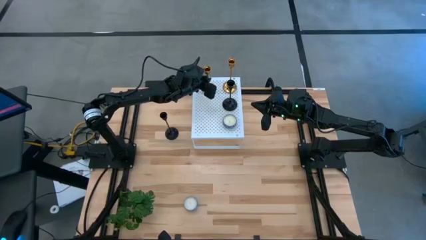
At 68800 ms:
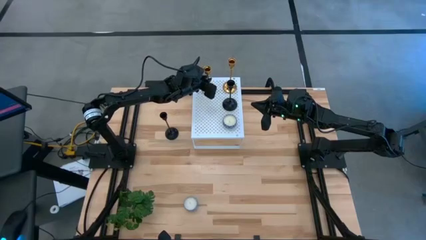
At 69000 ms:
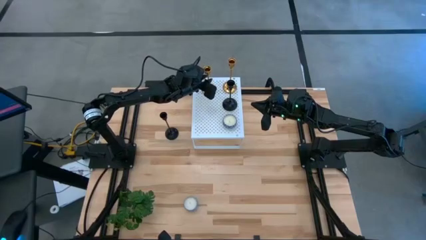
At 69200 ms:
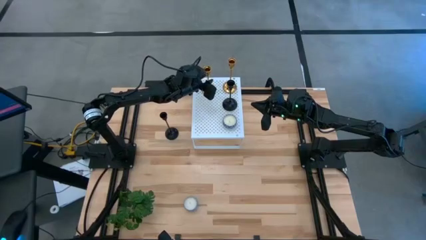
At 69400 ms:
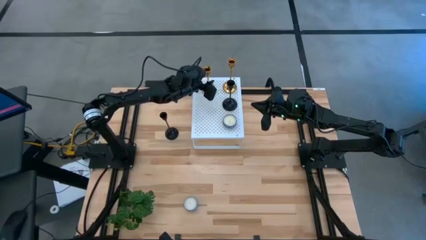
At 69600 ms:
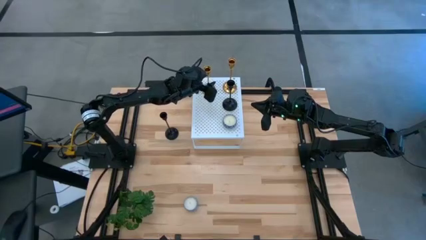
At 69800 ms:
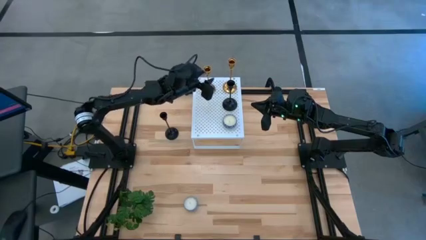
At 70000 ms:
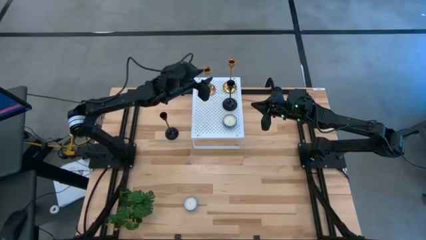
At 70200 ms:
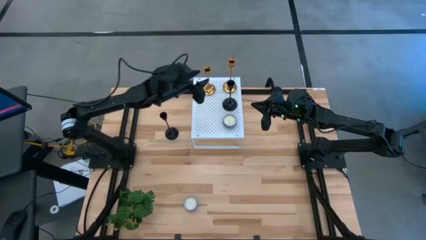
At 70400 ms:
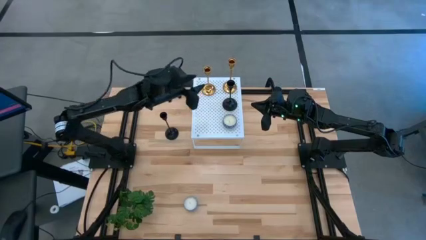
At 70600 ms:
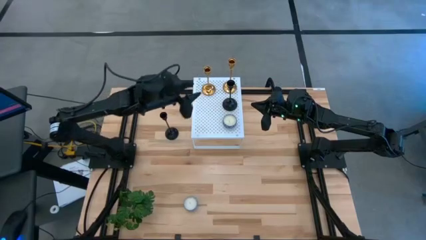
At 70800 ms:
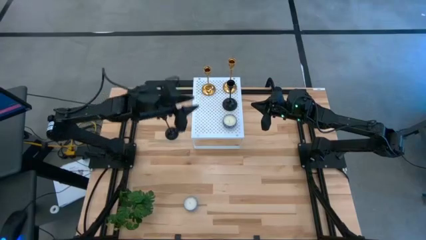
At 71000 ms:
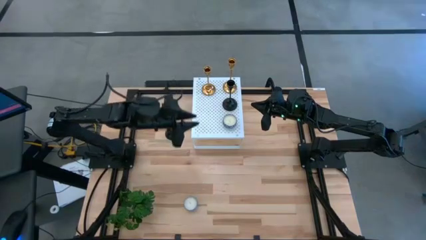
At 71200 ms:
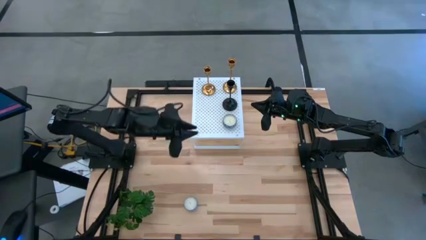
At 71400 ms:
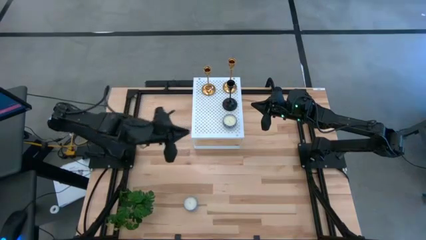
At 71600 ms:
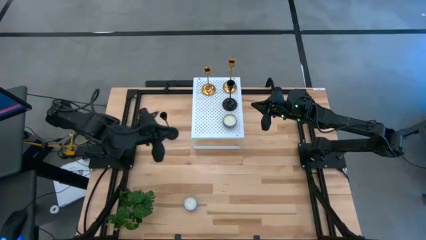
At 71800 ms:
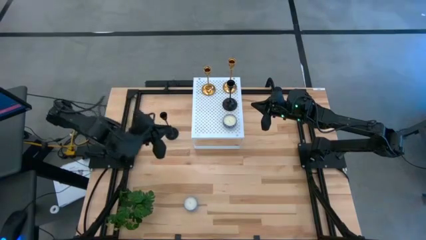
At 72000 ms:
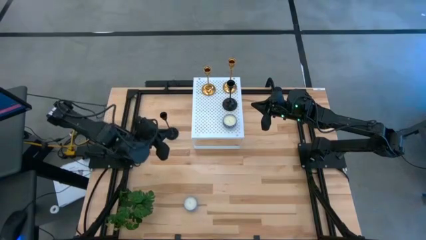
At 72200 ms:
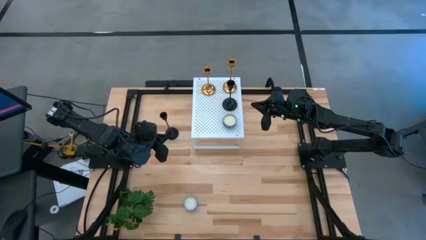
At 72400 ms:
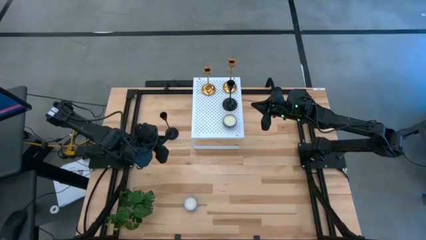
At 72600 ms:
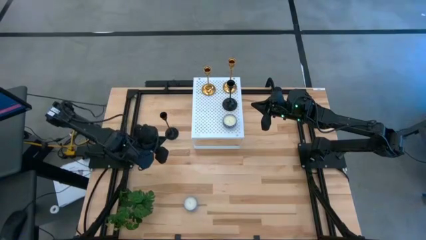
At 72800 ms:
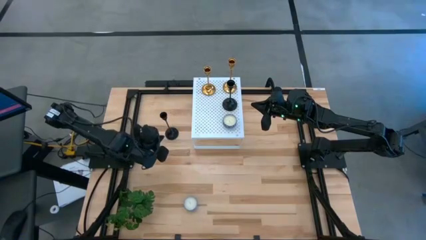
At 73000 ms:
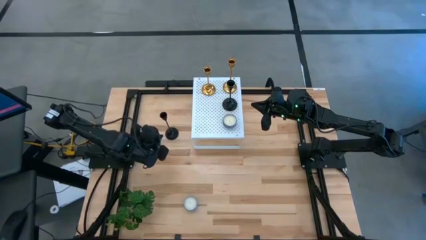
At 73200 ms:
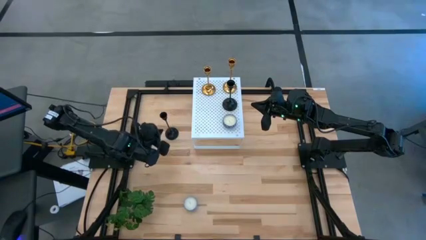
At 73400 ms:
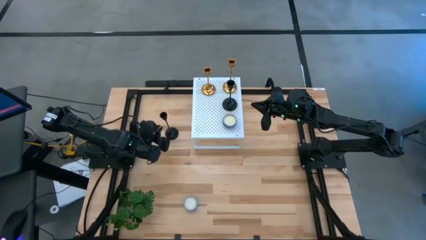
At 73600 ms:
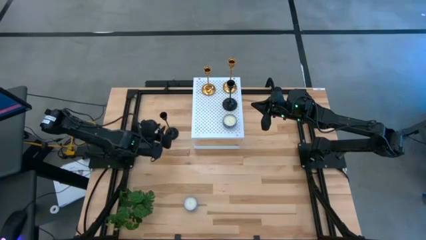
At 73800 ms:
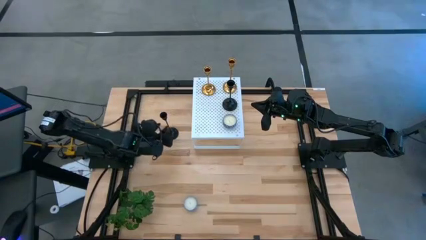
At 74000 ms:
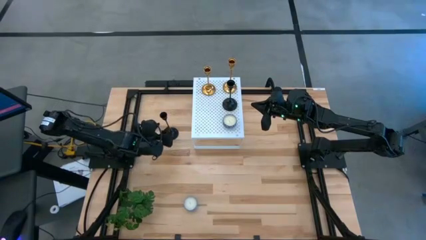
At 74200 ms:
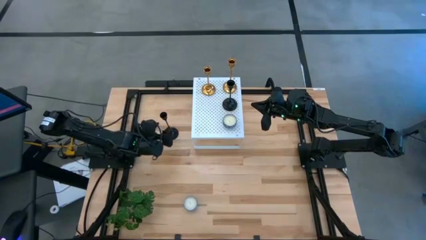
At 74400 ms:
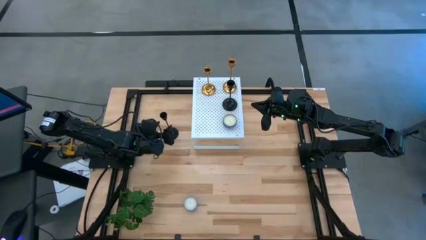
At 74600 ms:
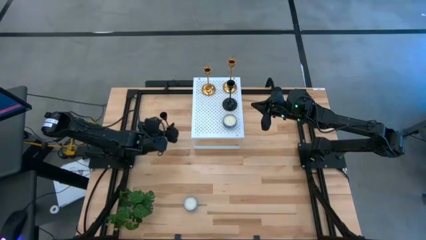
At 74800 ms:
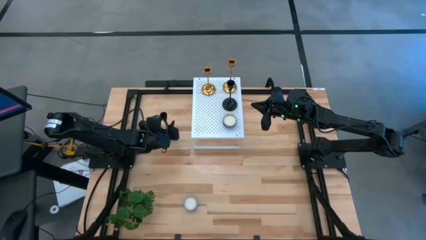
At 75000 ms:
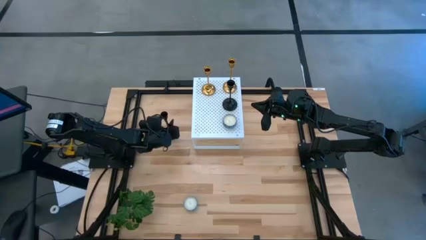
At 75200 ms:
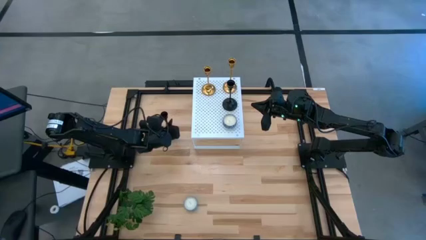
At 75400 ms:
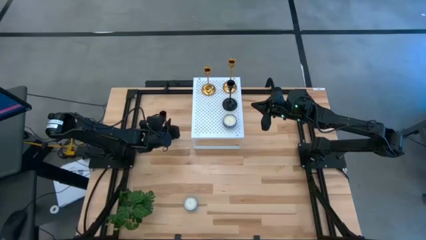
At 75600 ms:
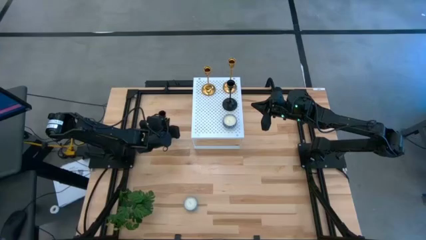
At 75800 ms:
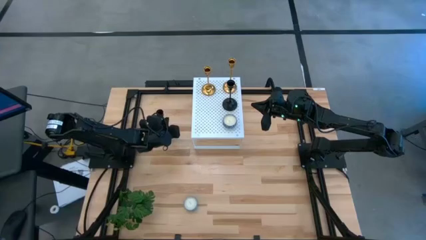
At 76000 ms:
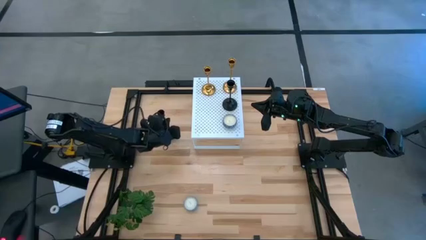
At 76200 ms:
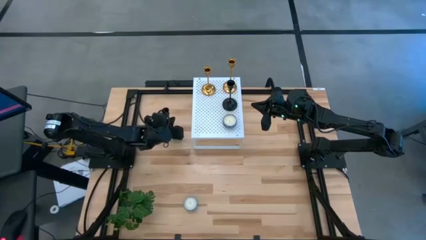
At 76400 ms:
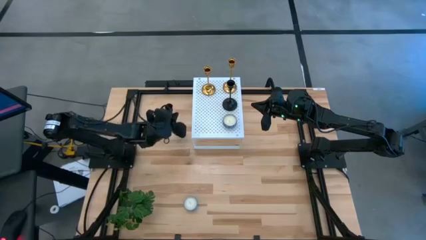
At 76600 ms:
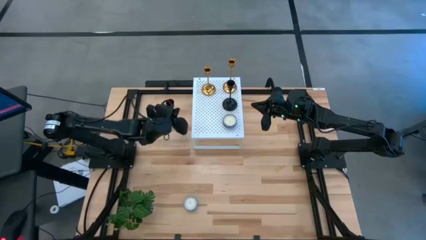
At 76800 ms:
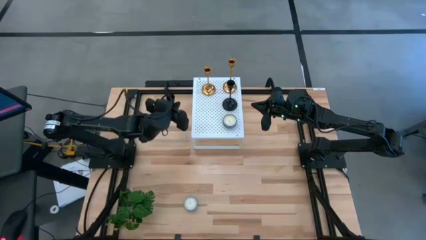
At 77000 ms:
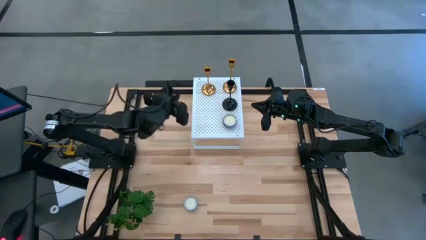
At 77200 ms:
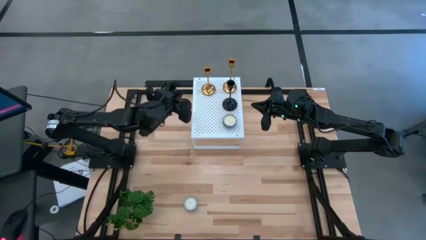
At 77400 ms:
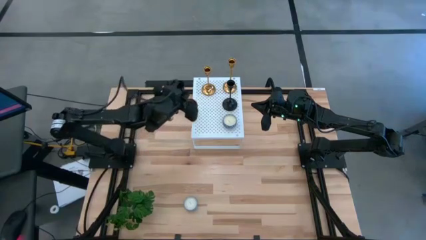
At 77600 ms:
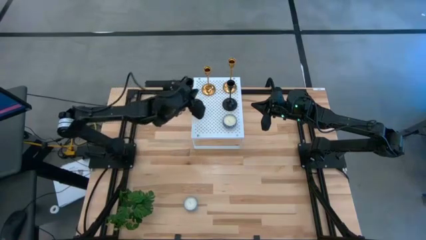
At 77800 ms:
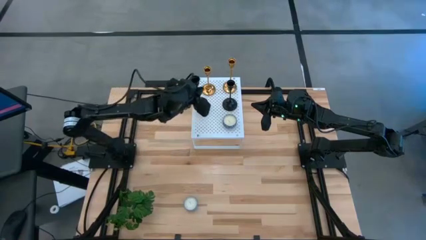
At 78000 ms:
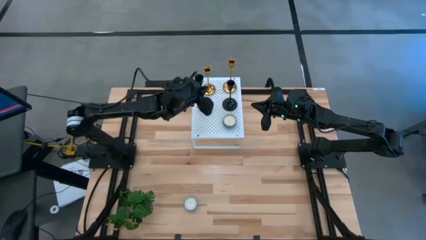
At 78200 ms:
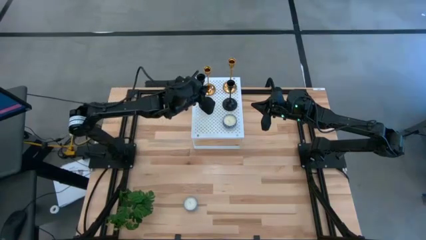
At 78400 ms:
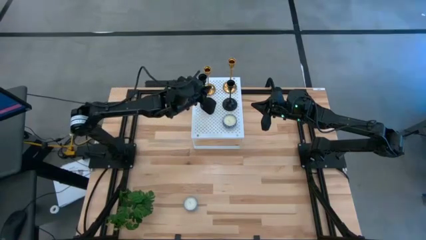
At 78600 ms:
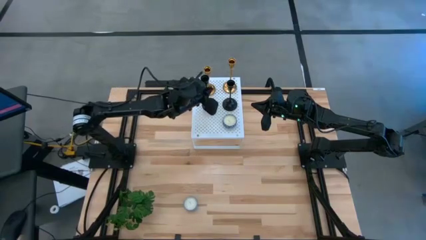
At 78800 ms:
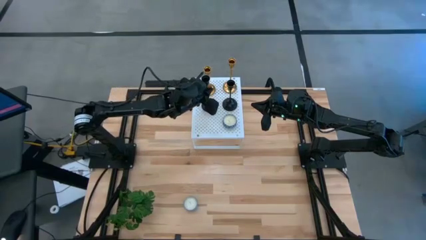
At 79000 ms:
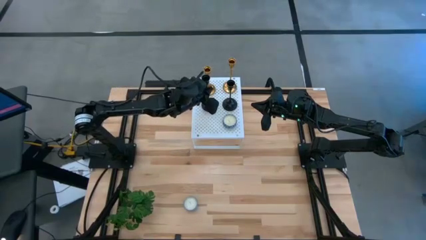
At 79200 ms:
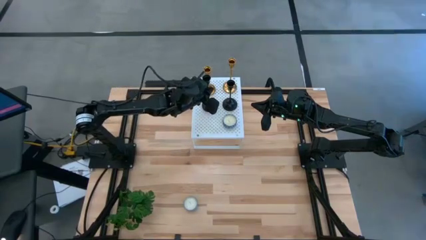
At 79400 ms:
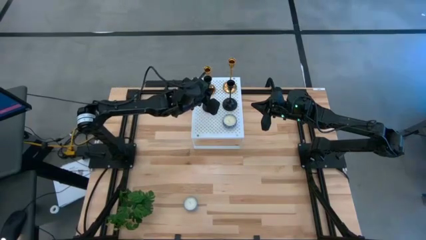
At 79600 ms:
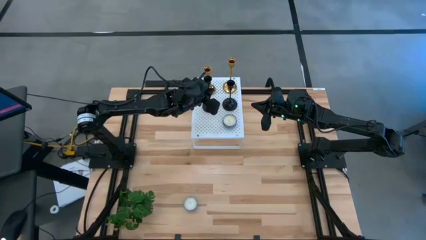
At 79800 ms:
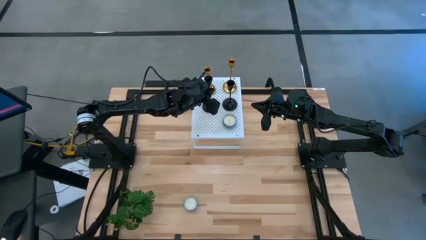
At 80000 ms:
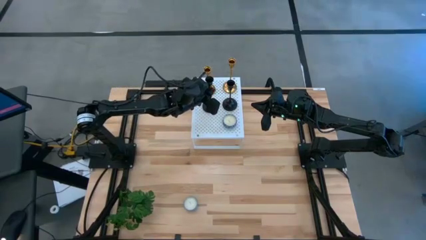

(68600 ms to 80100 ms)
Task: Pick & Place candle stick holders
Put the large black candle holder on the shelf aligned with the small black candle holder

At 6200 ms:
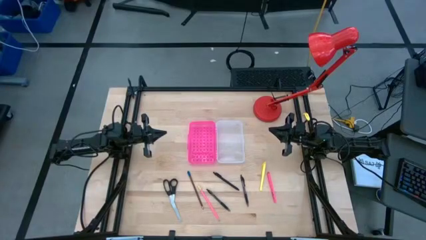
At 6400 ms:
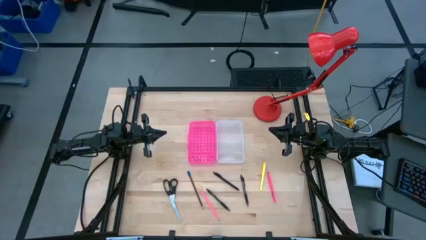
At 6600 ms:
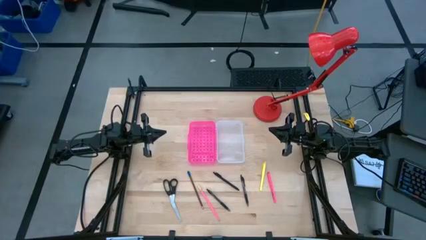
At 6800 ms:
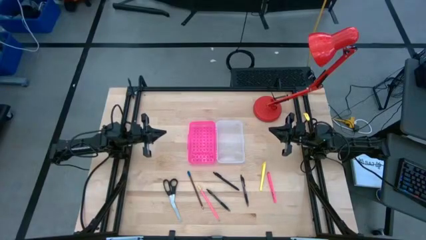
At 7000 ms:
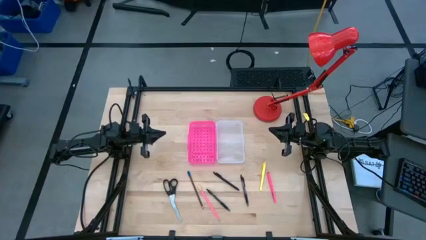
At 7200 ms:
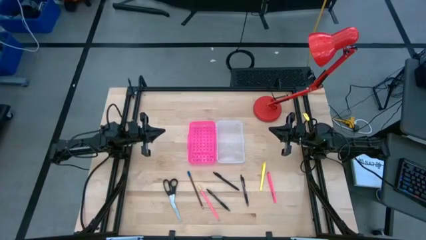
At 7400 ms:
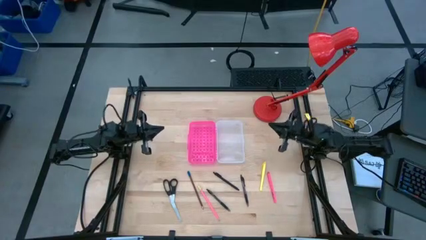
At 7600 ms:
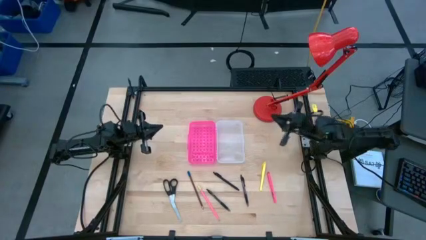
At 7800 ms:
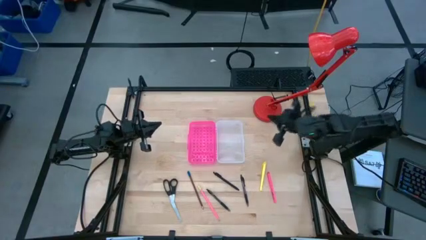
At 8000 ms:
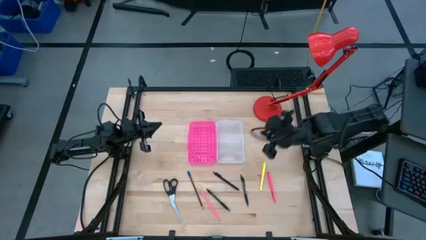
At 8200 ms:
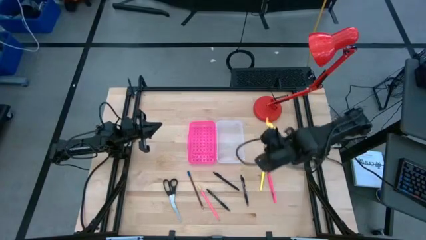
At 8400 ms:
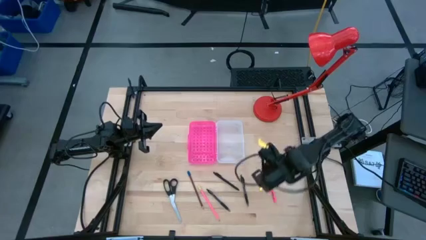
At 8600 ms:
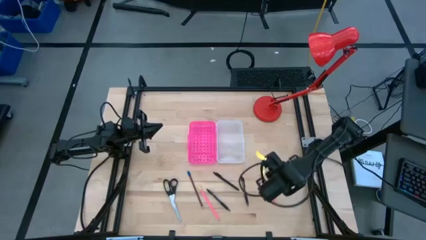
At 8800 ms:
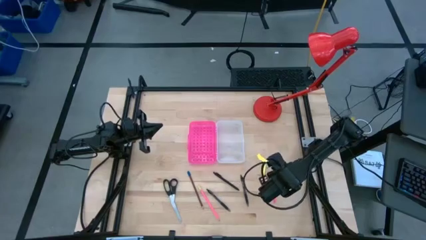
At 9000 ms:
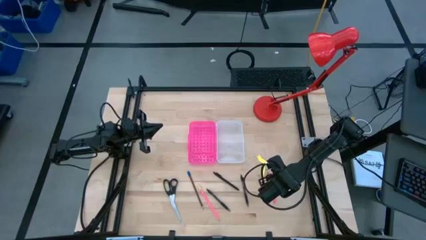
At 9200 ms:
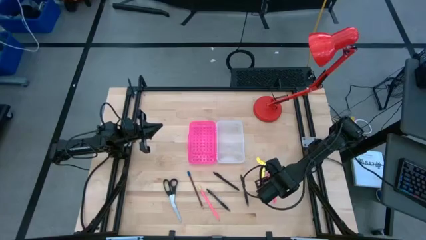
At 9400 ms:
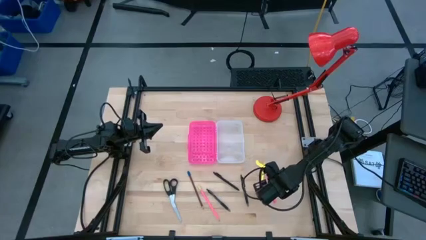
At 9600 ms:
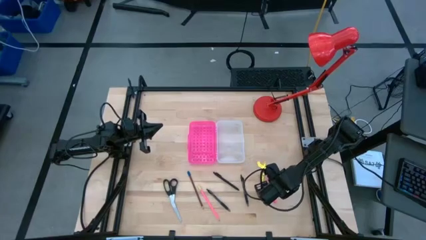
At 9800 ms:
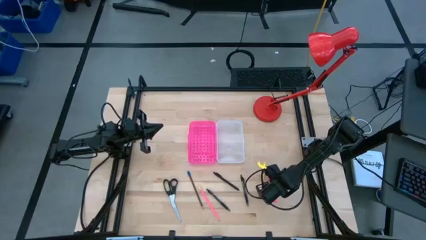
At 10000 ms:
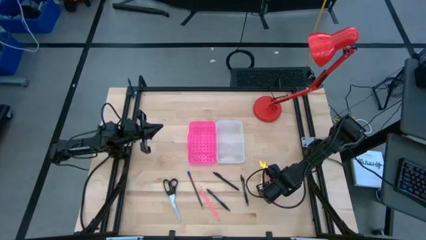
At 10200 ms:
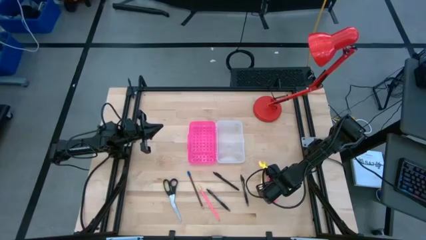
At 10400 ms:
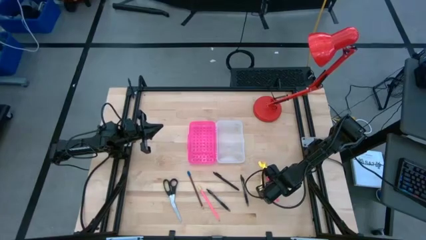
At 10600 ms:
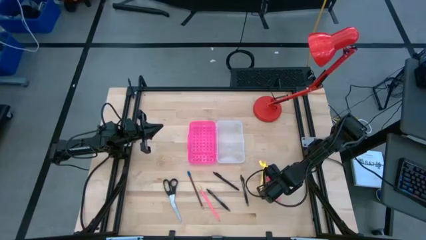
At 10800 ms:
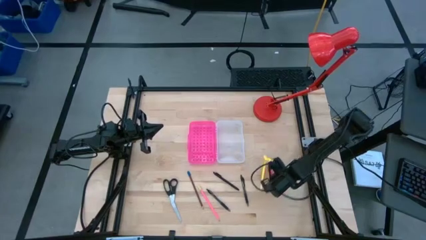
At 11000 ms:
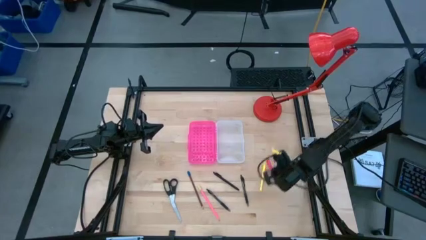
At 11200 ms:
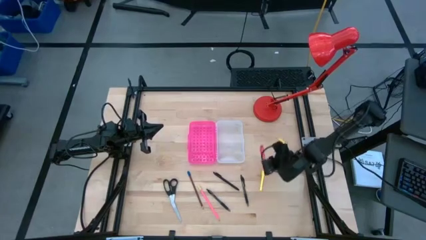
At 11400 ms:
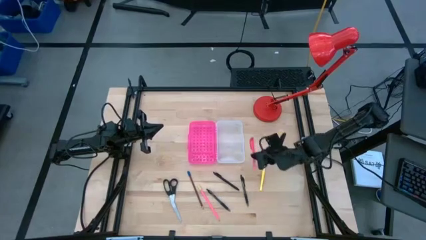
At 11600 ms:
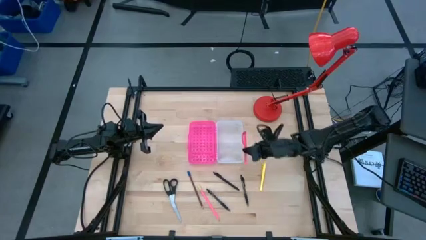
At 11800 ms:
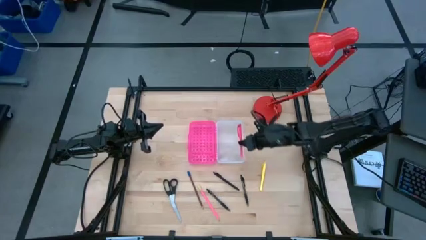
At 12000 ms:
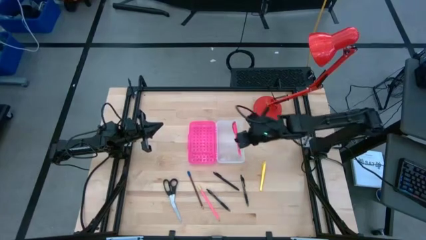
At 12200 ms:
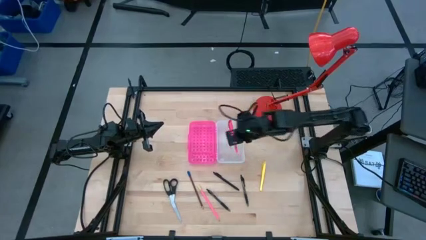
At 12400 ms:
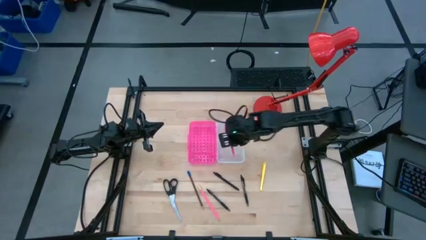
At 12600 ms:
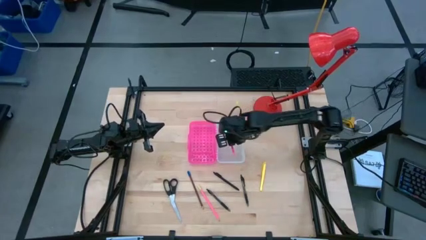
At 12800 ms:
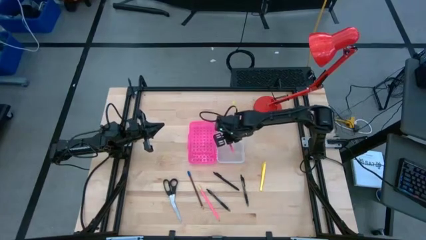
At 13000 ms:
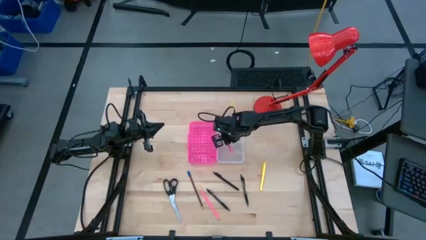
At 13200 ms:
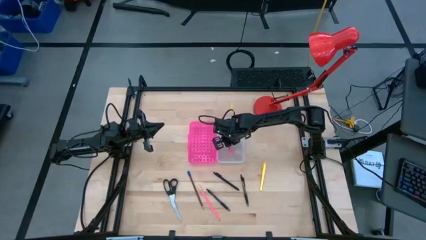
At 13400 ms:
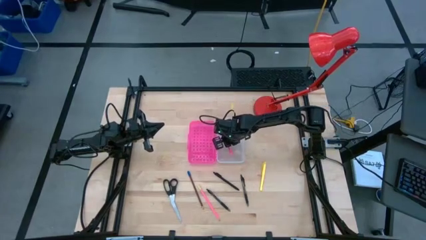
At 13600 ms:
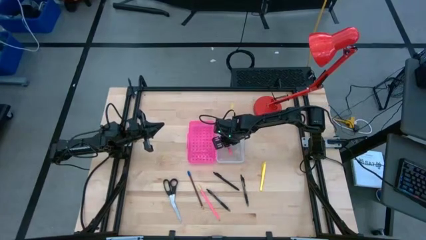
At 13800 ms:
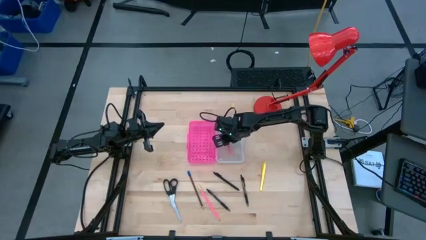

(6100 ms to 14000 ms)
Task: Pick & place school supplies into a supply box
Put the pink pen into the supply box
